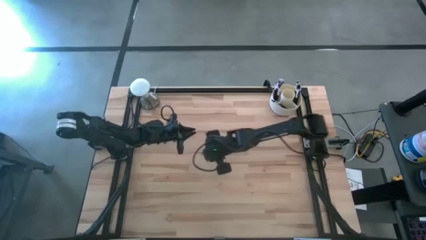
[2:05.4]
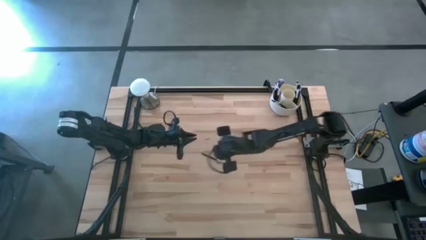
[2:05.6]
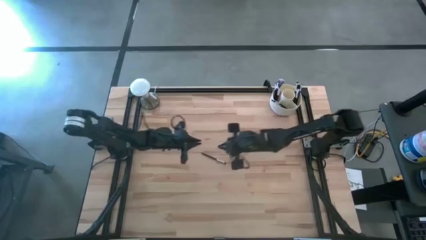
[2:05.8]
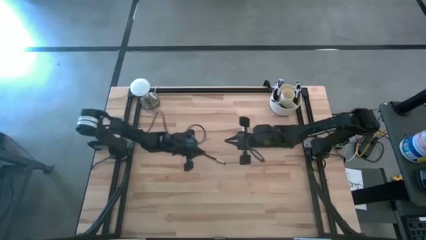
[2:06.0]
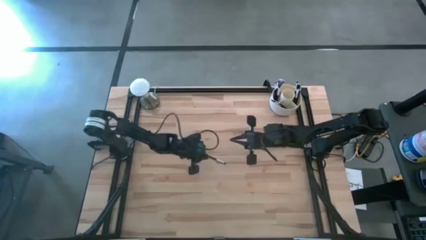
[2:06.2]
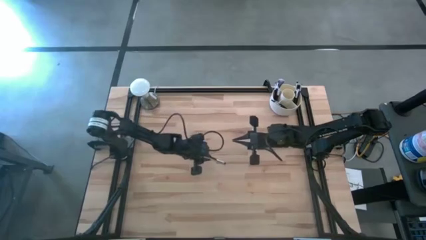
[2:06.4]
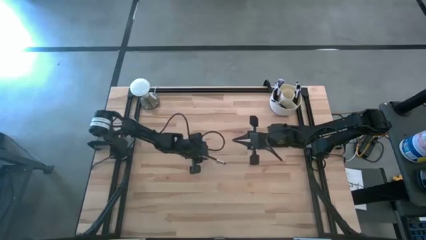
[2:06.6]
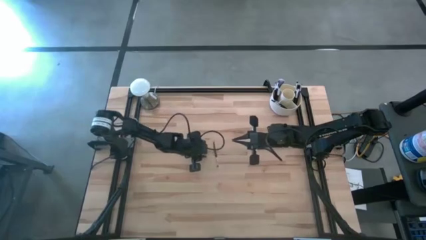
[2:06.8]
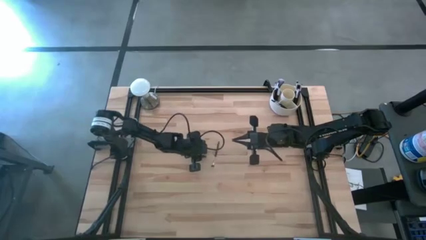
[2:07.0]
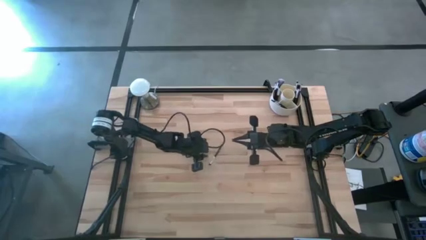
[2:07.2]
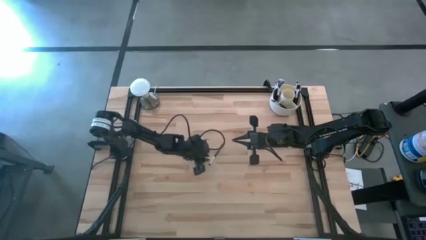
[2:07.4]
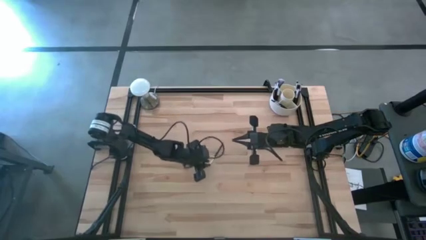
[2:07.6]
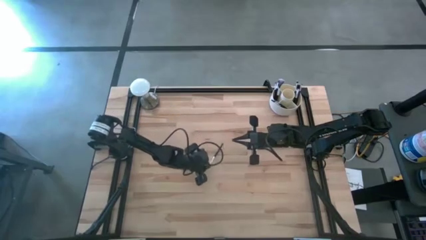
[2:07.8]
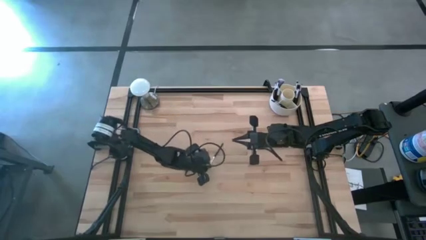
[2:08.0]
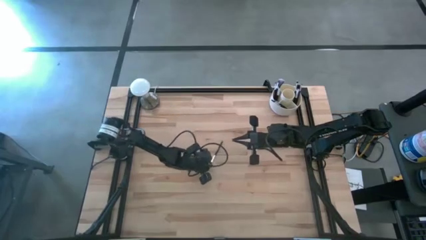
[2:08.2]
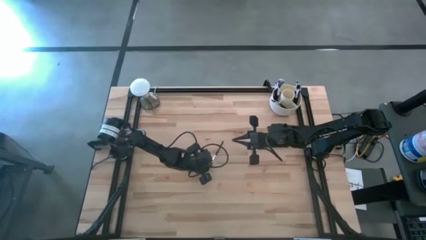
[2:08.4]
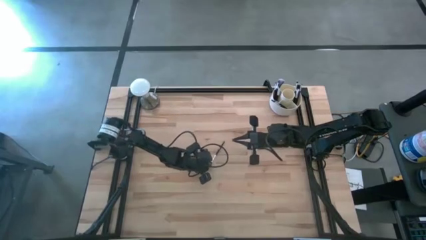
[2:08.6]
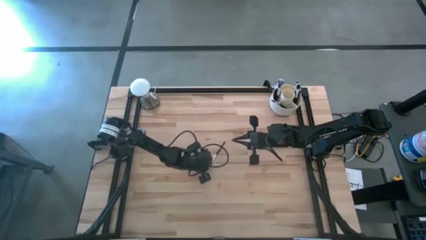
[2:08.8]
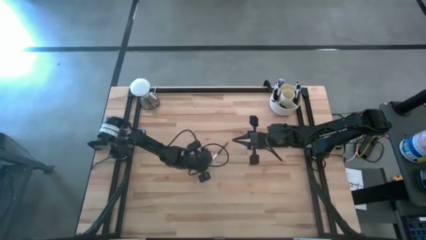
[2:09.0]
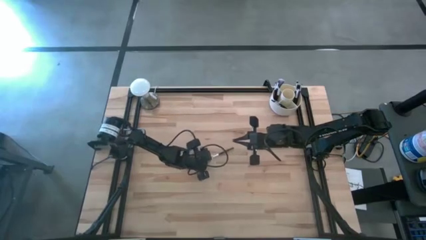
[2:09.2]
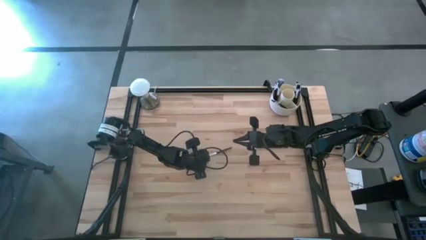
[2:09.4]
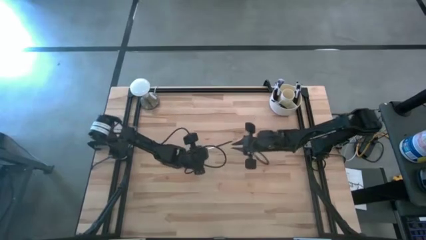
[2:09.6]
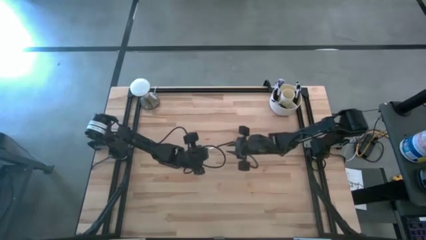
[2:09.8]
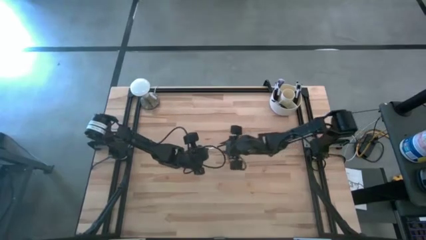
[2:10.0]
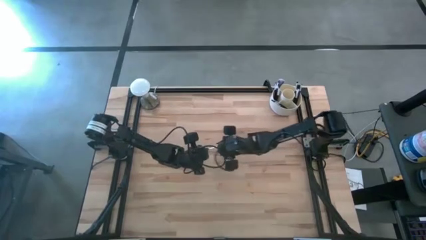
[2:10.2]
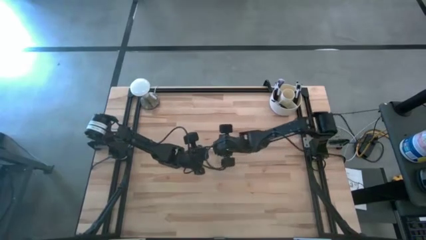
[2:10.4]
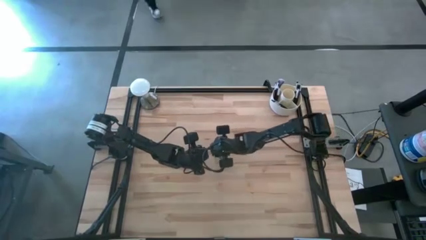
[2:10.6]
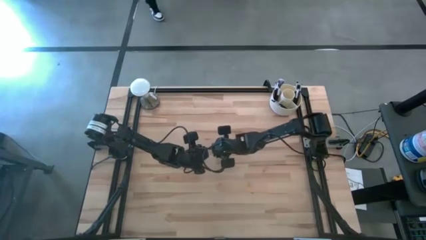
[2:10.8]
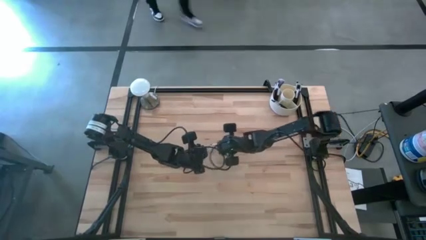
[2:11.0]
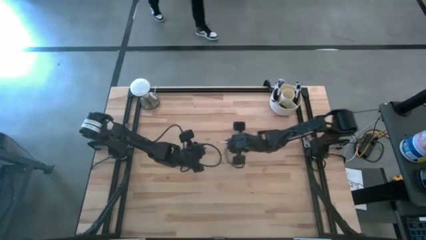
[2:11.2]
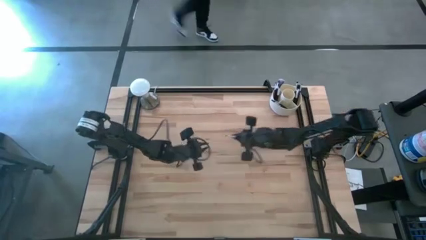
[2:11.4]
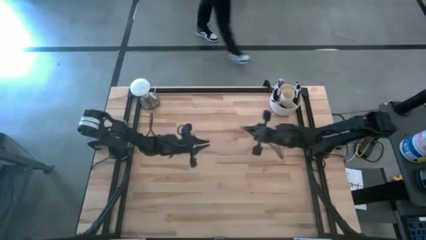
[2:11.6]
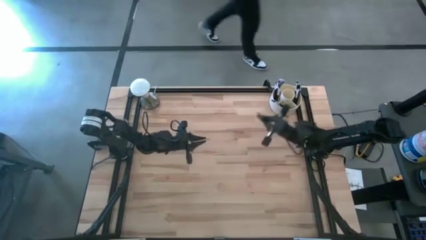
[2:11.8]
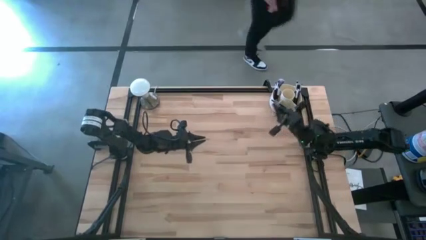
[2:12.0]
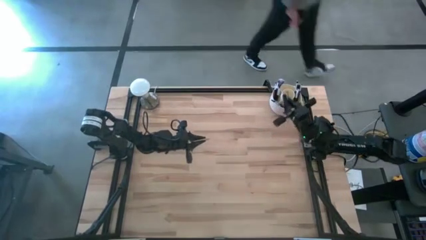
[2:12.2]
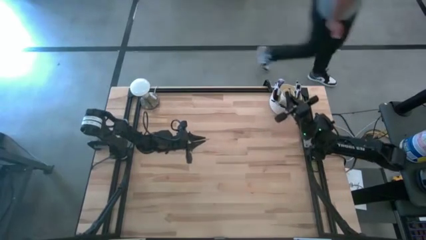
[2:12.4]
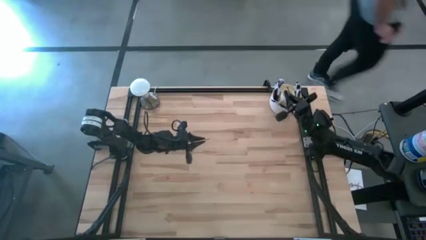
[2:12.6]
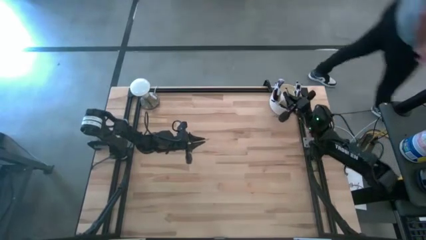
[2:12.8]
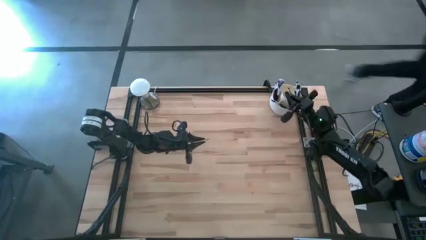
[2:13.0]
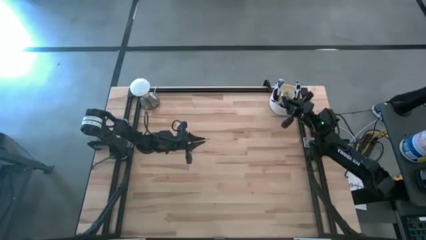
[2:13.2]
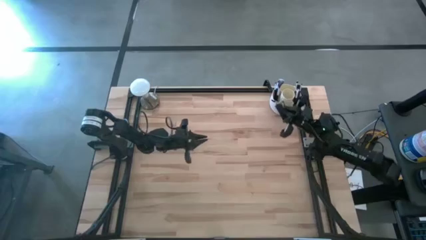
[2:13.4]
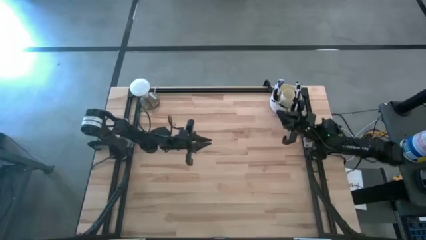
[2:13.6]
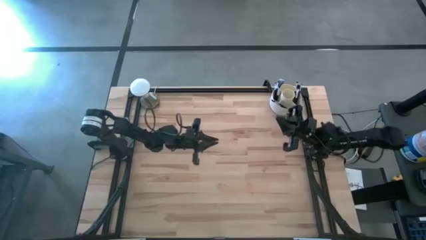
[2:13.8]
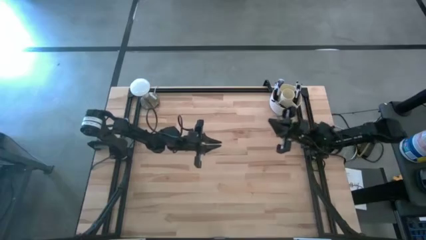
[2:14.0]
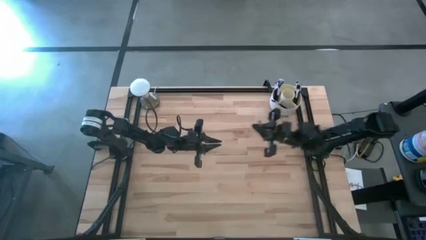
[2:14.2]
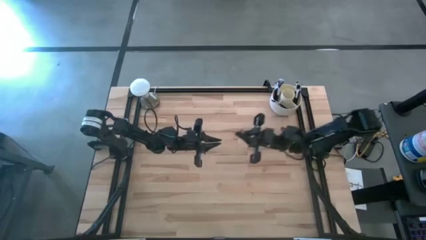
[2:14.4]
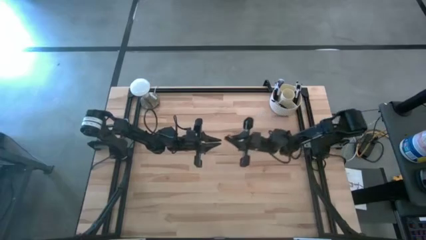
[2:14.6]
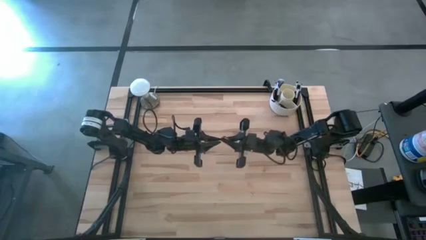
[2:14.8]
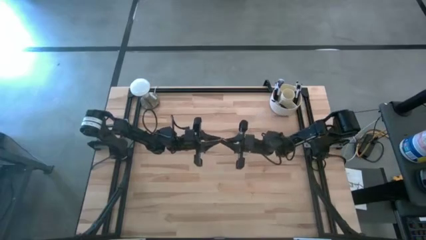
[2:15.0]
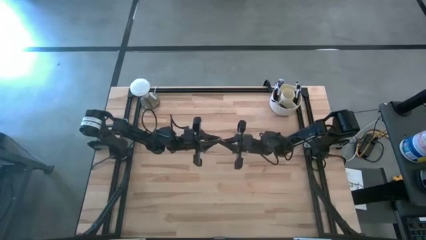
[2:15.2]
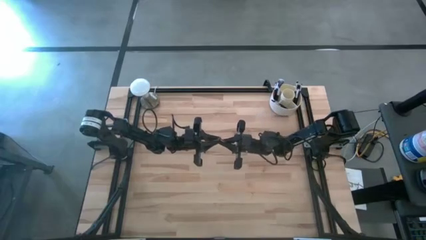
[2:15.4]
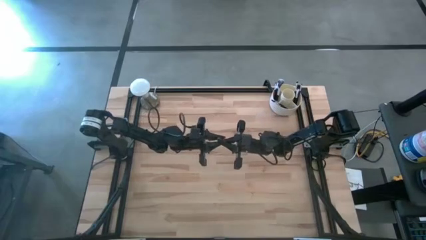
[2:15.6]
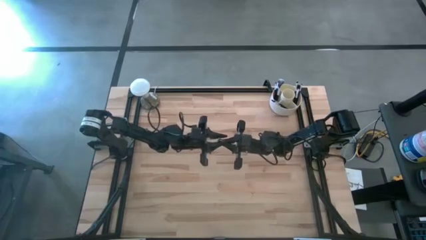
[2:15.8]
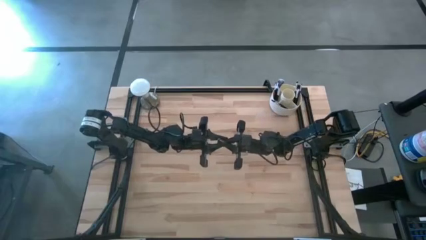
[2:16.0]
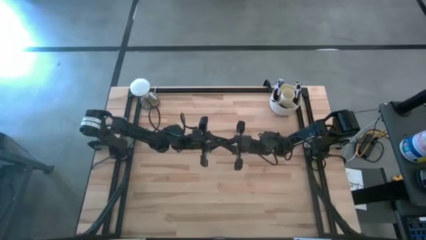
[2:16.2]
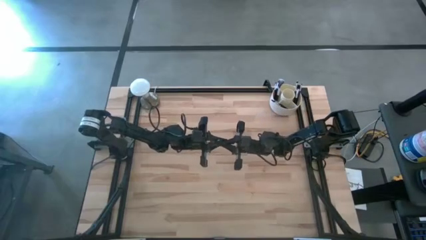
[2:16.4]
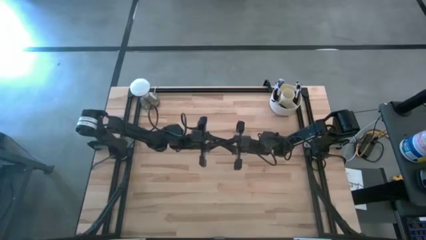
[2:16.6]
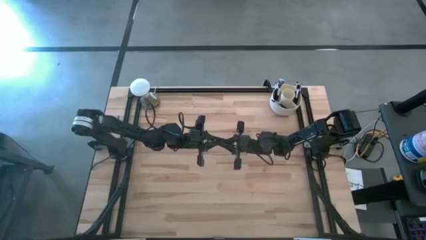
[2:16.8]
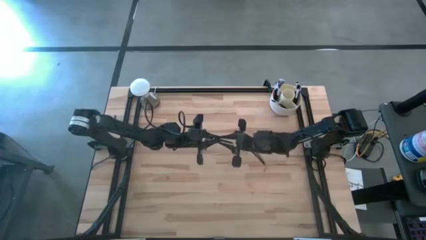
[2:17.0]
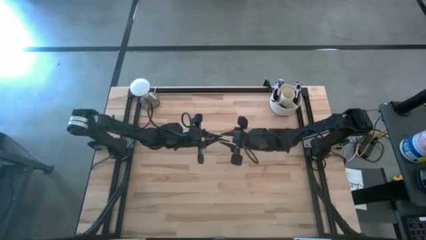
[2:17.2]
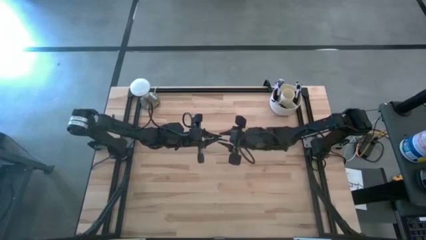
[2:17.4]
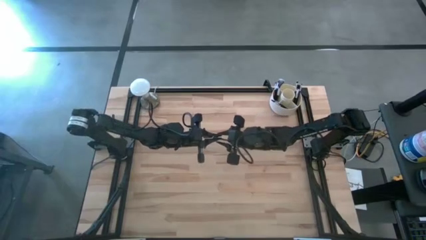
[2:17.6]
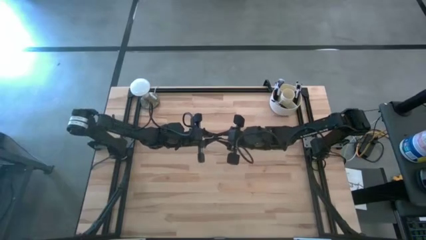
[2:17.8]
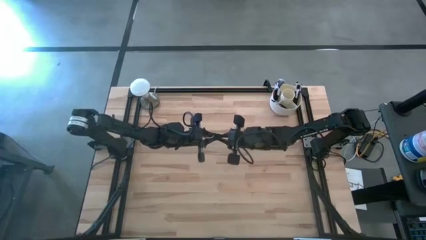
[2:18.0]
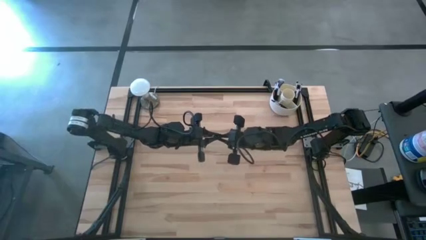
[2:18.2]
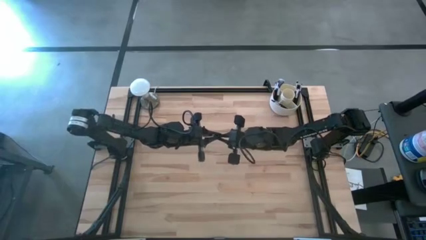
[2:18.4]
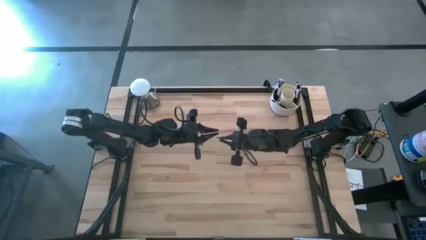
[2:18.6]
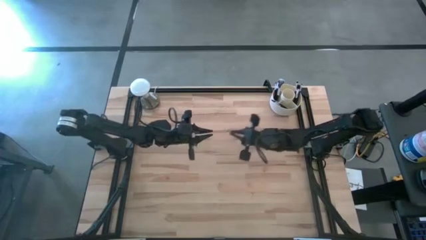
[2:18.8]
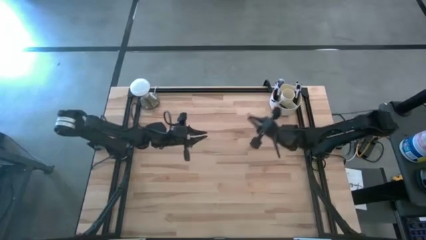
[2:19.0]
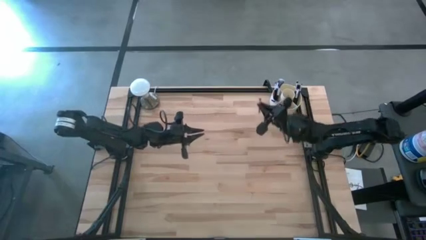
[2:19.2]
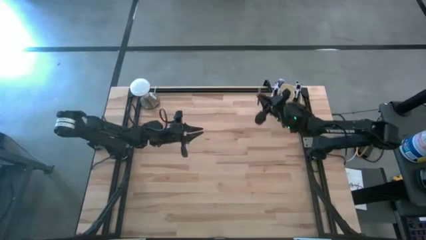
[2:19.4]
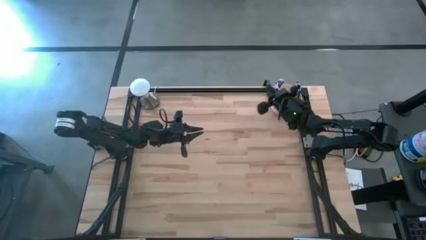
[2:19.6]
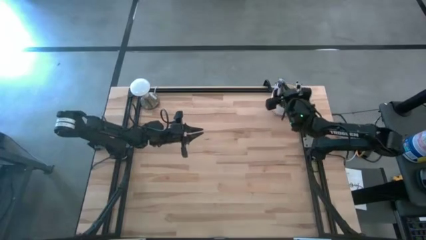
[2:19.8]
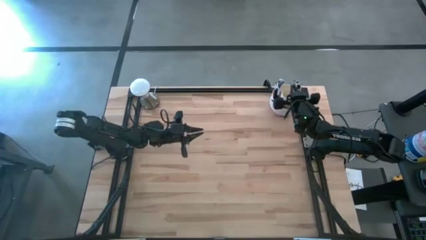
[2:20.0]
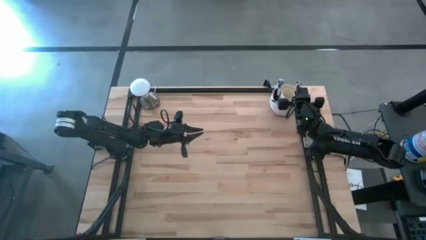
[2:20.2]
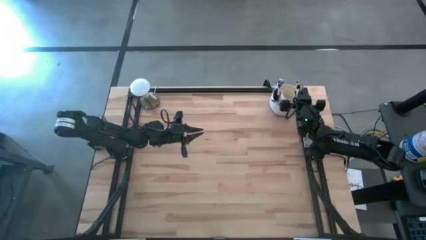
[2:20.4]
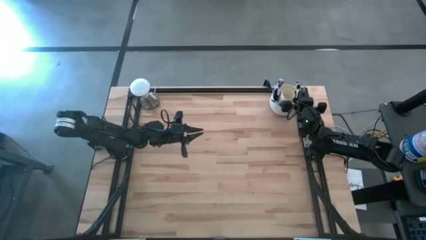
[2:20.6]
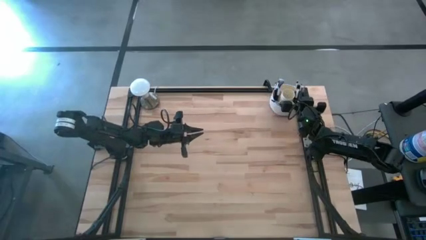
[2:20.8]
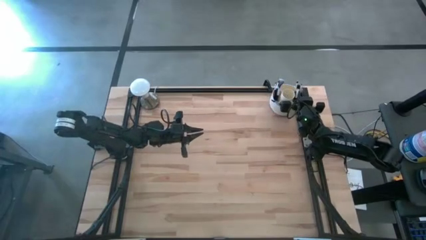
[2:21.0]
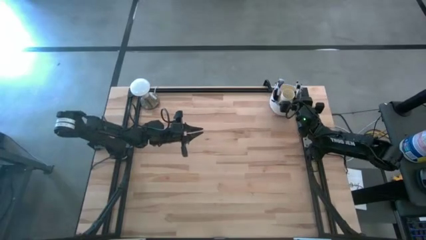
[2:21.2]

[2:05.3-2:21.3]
Task: Put items in baskets/containers
Put the black eyeshadow brush into the white organizer

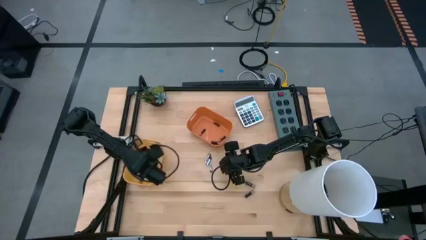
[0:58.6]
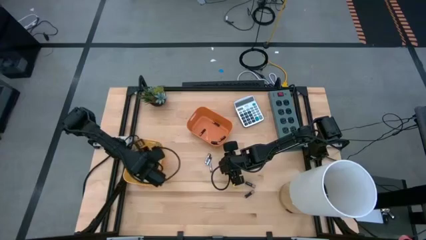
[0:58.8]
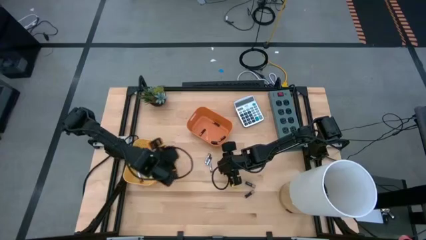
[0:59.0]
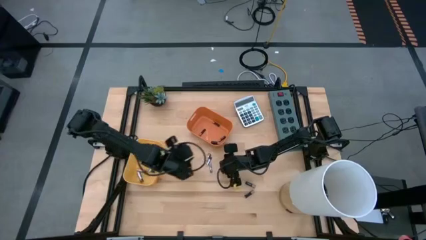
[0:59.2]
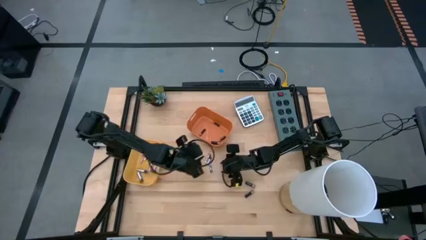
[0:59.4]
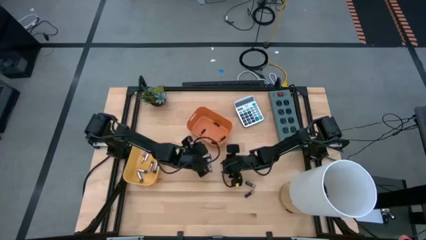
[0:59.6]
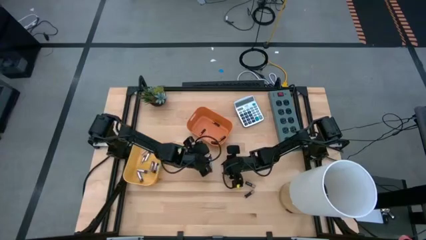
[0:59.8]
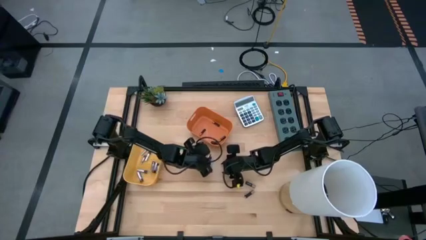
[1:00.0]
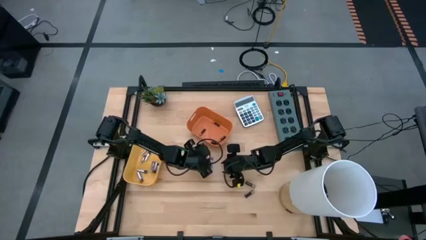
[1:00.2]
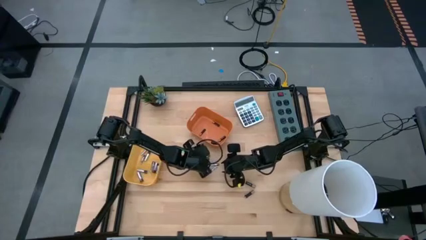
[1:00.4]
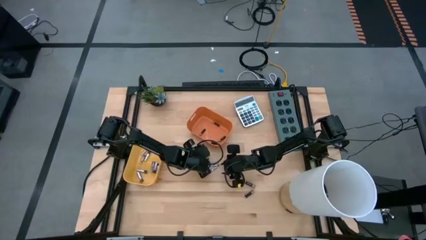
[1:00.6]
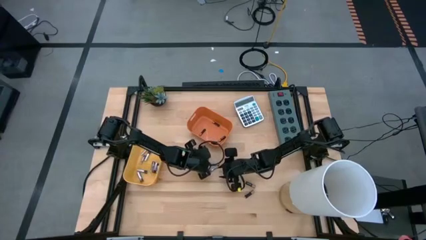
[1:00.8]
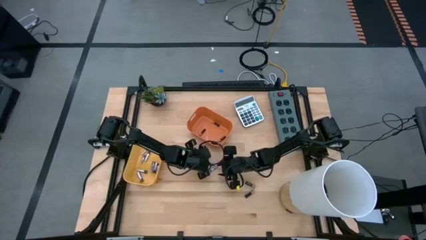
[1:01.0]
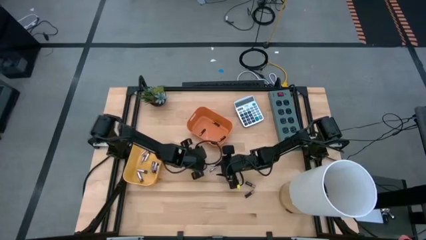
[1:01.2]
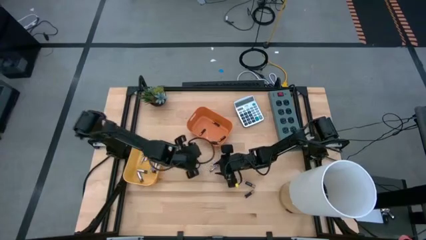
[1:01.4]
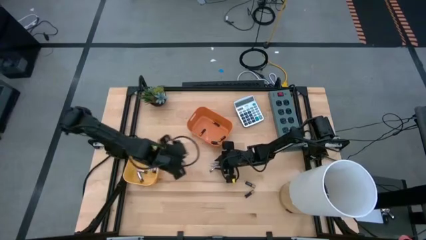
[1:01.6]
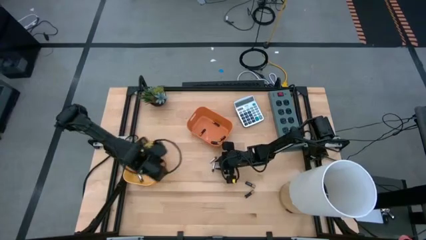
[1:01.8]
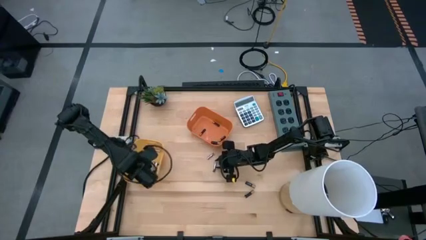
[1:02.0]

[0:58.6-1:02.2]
Task: Sort batteries
Put the silver battery into the yellow bin
